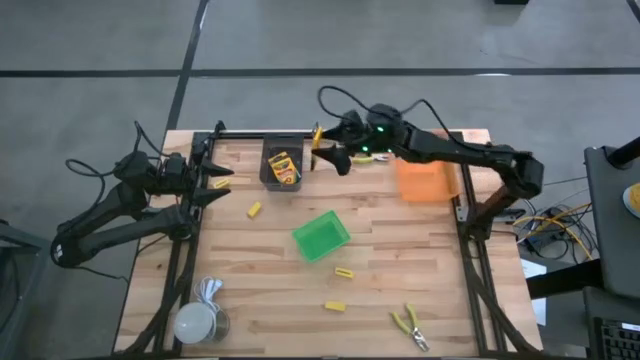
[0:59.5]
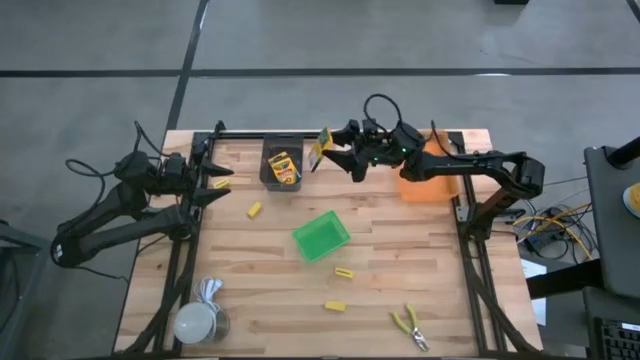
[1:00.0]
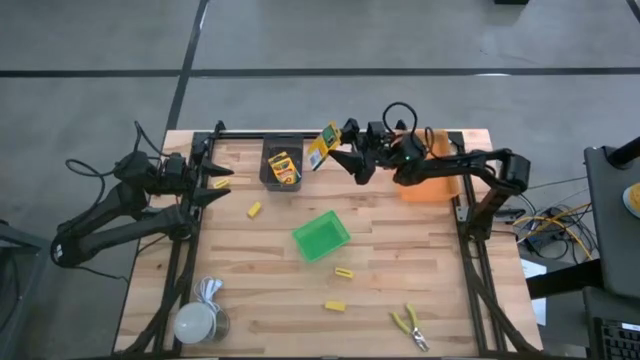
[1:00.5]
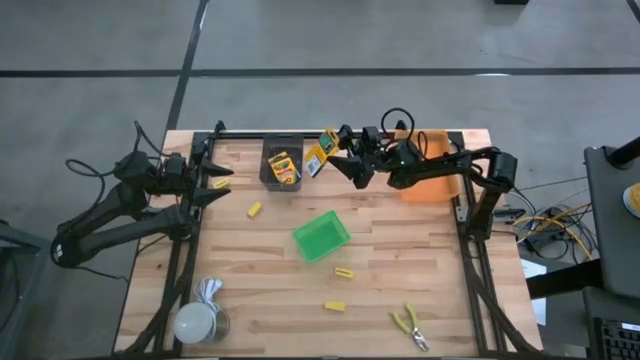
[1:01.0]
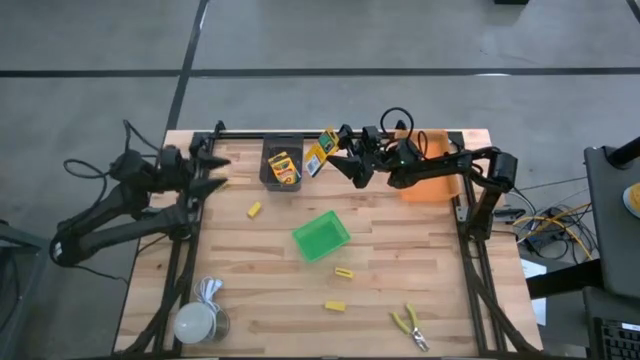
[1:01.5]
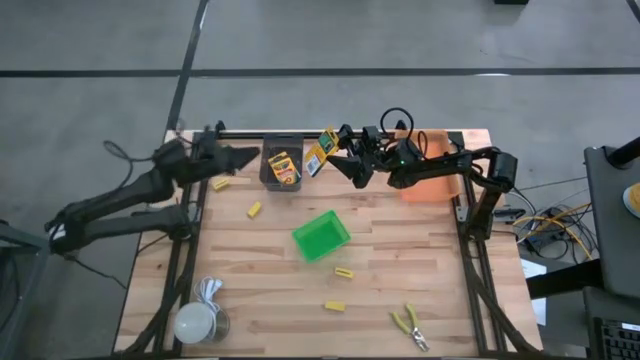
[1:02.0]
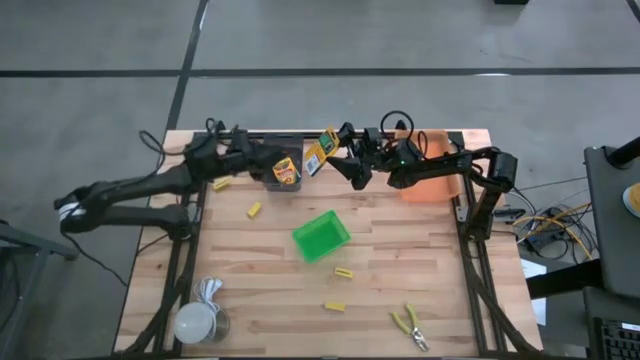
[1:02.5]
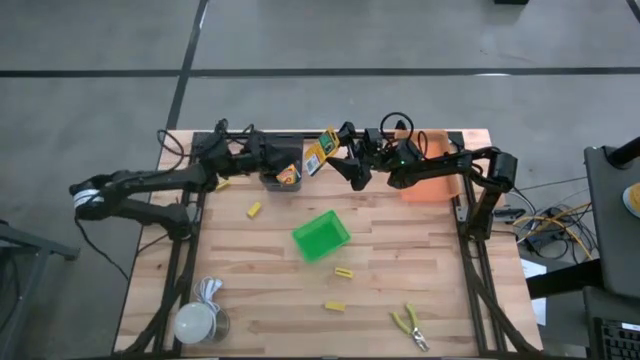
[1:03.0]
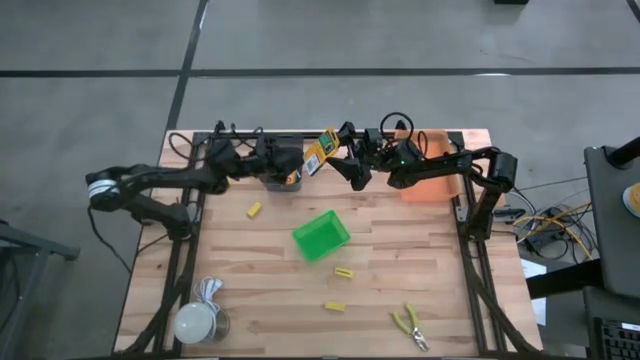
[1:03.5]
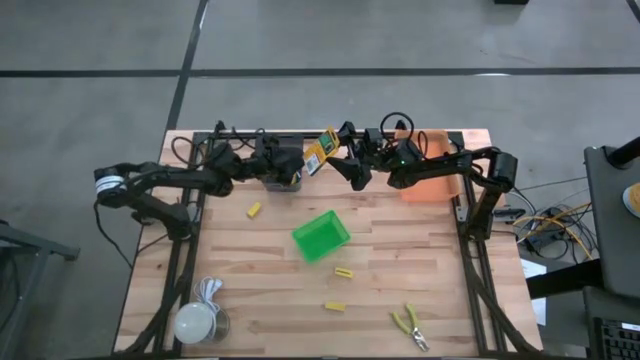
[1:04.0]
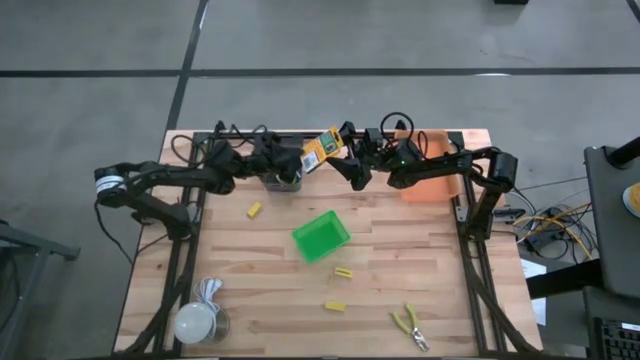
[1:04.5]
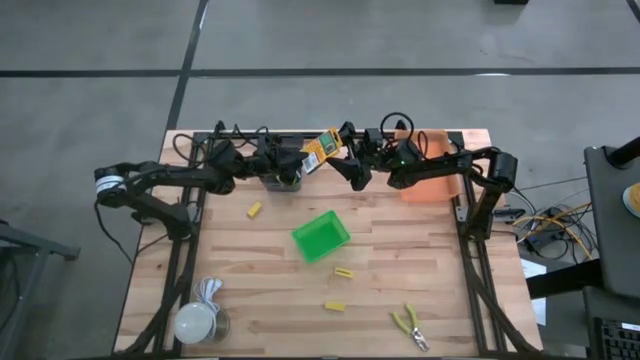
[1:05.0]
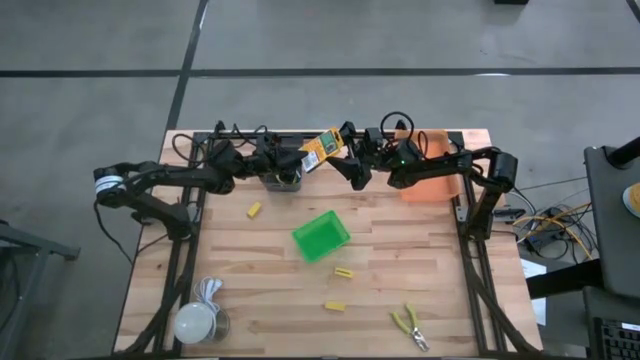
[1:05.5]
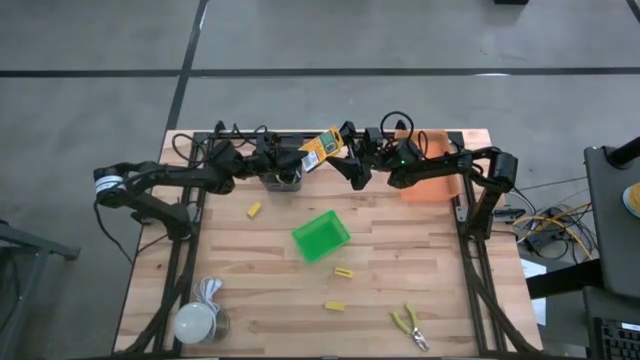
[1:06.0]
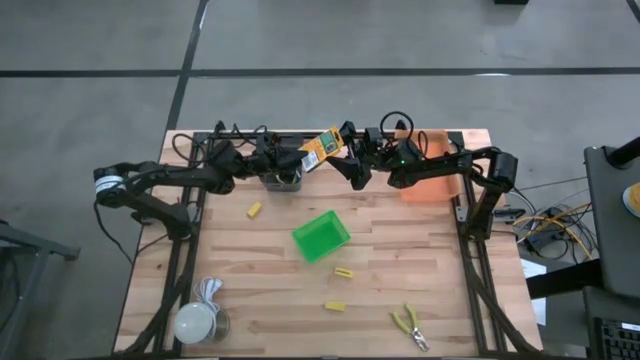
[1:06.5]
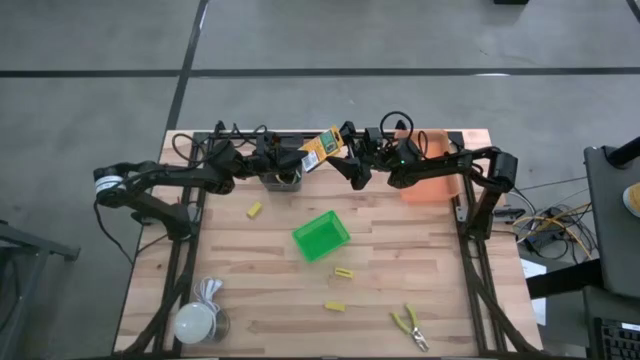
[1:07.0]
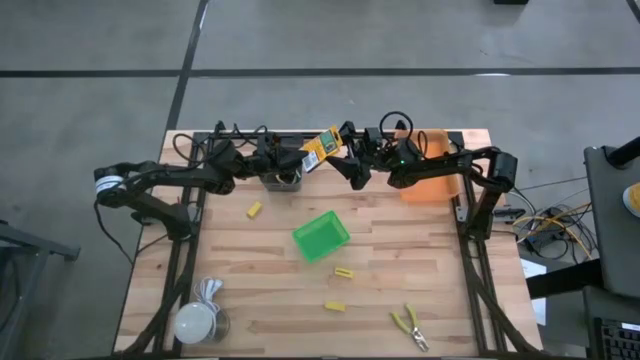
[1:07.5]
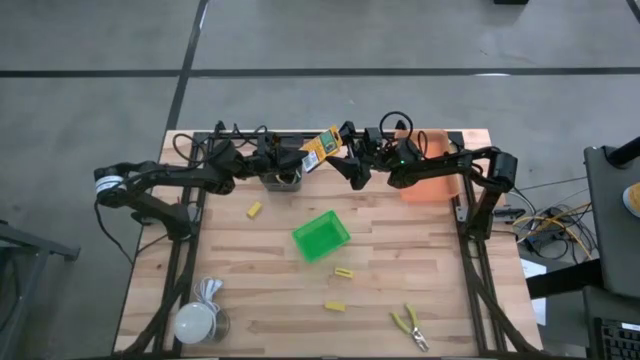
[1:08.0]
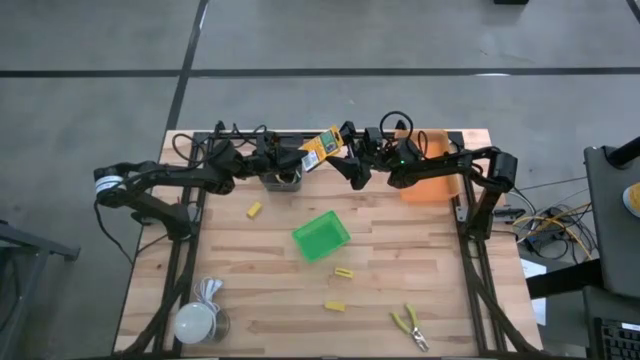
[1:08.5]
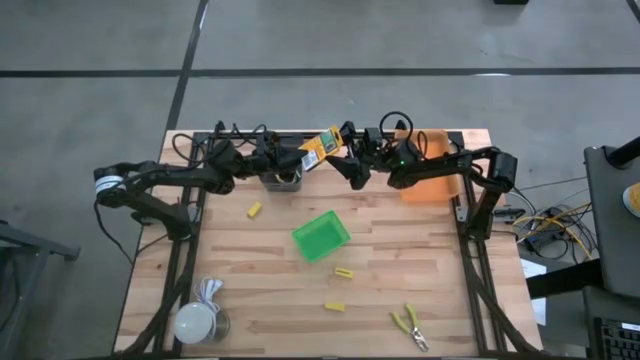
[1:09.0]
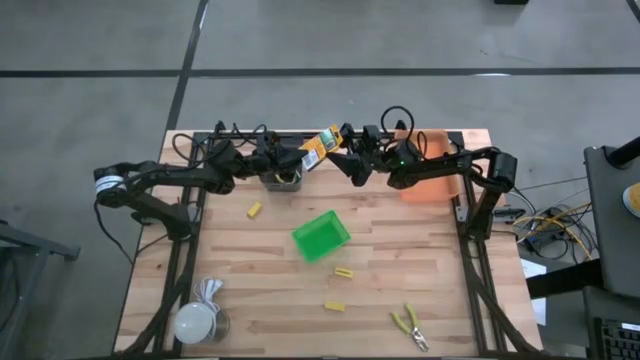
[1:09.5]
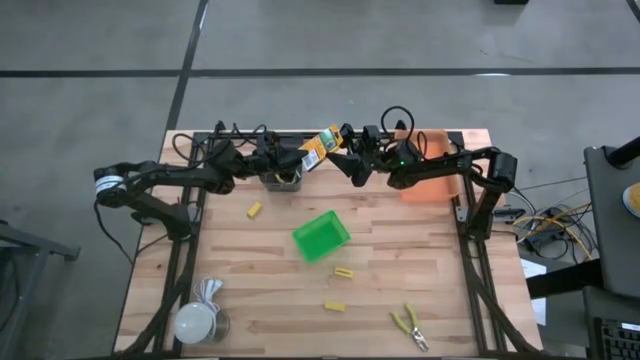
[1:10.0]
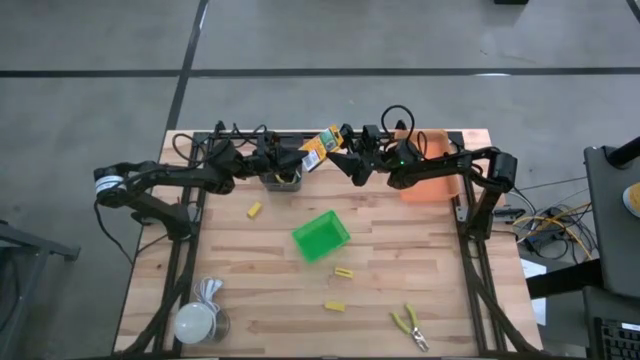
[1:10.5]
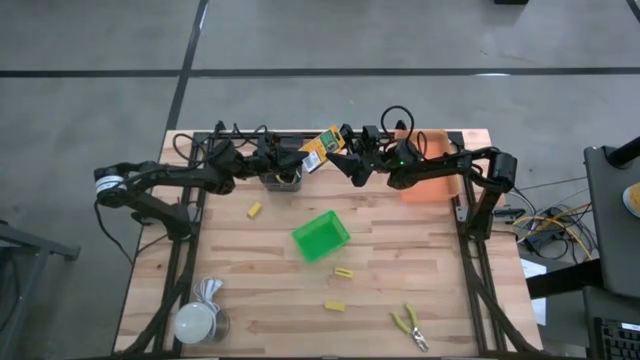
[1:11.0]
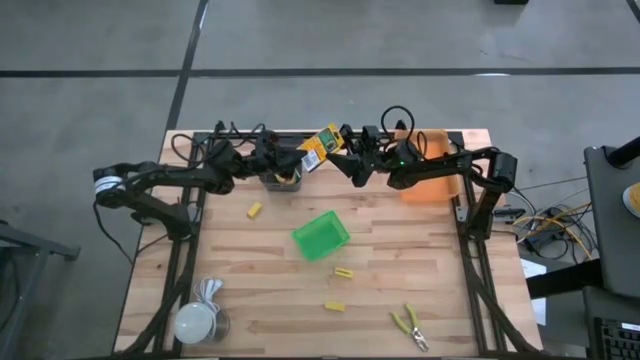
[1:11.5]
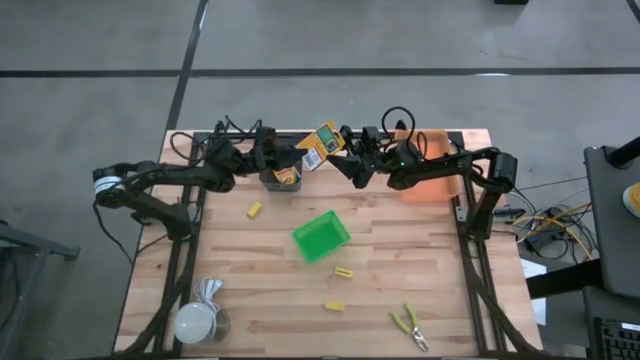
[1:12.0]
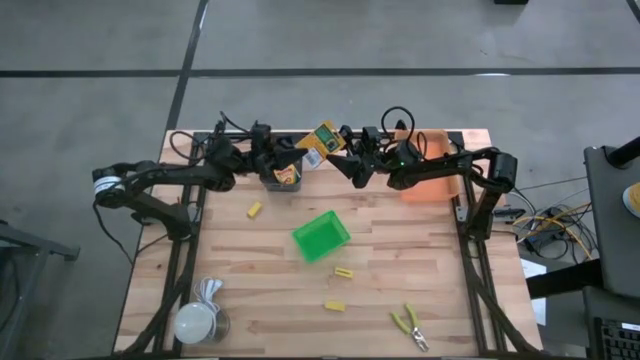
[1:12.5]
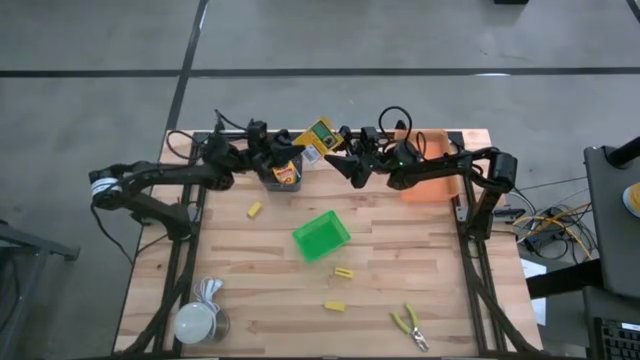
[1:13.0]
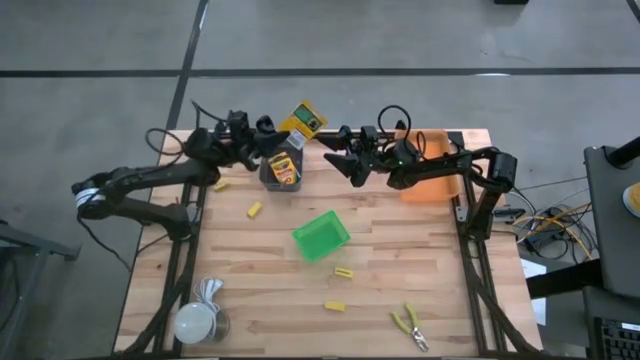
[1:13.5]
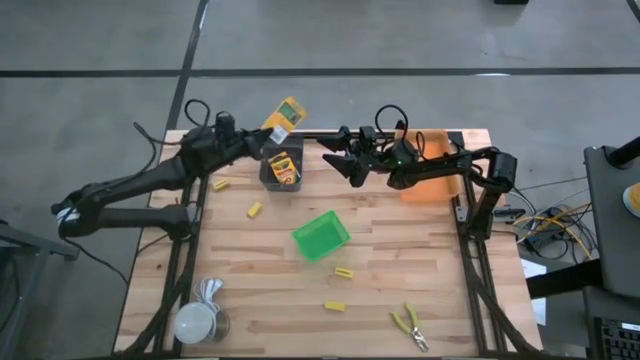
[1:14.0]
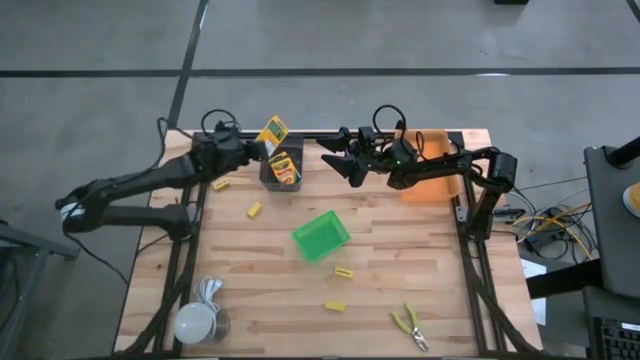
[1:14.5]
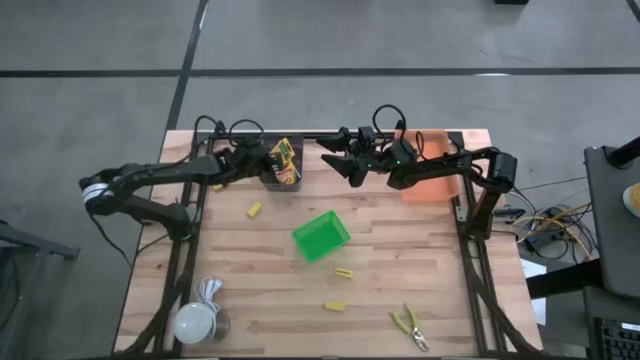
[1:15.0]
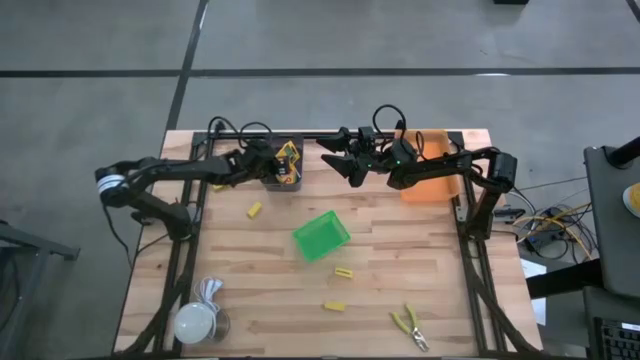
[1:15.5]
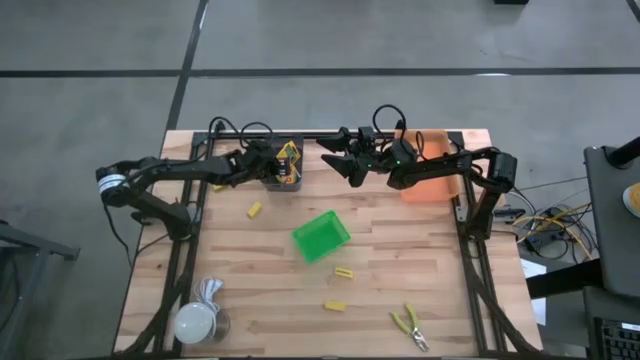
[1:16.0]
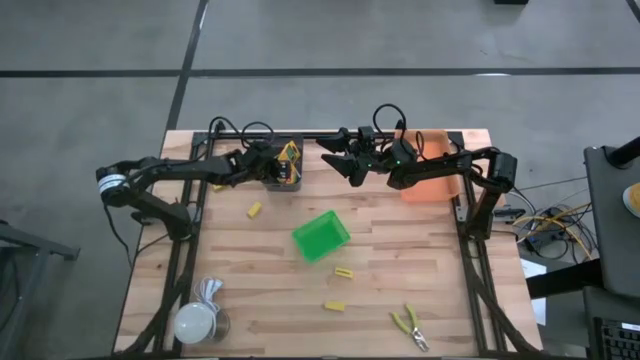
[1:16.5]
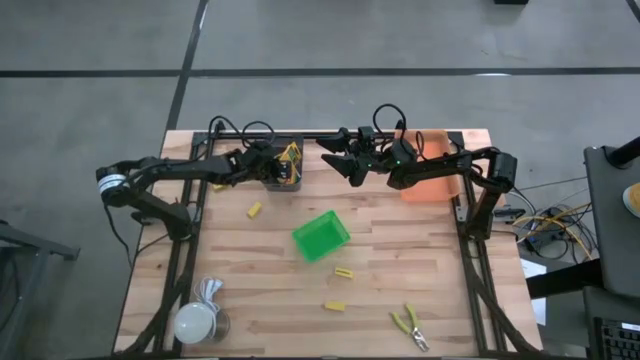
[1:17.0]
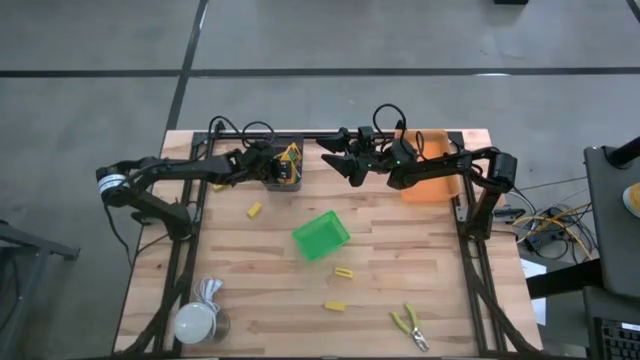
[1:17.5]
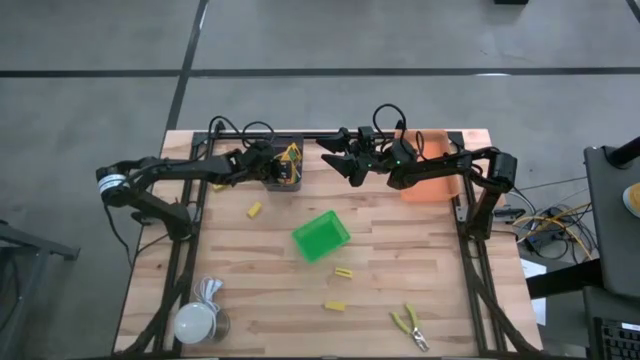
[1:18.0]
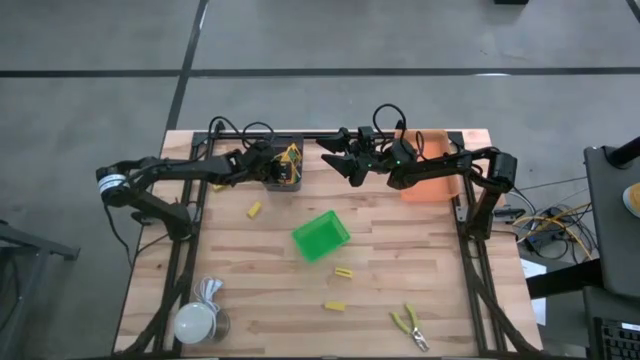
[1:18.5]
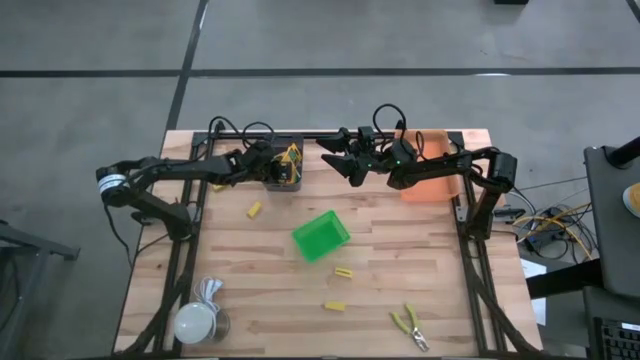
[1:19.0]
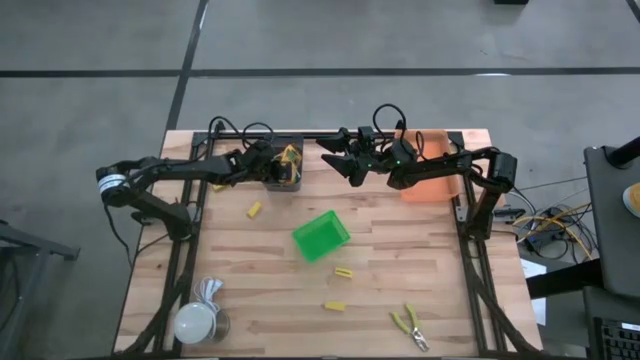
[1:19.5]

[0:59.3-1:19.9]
Task: Pick & Place School Supplies
Stack the yellow crayon box on the yellow crayon box in the black bin
